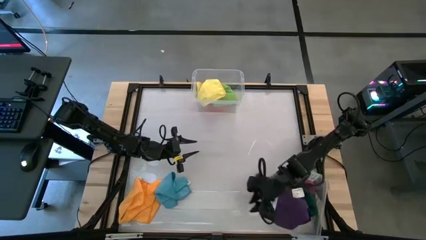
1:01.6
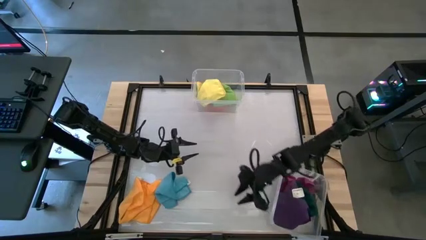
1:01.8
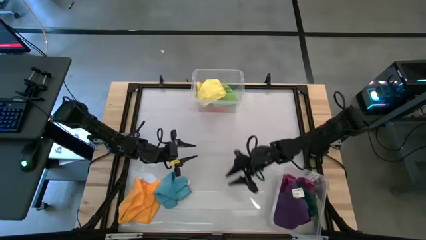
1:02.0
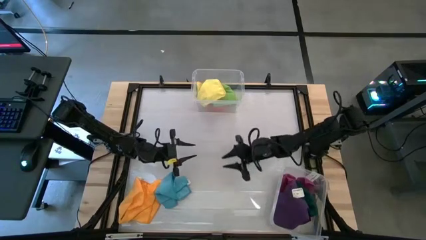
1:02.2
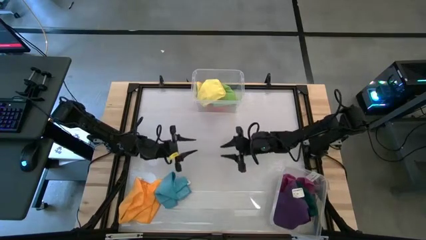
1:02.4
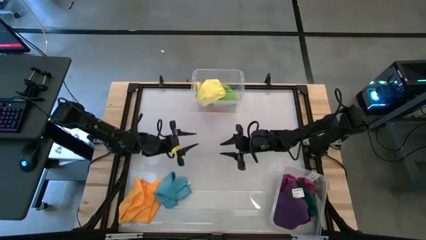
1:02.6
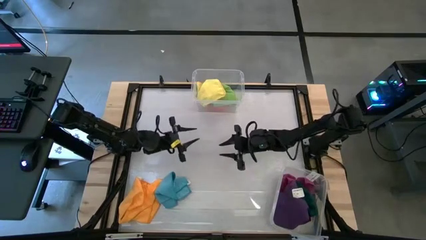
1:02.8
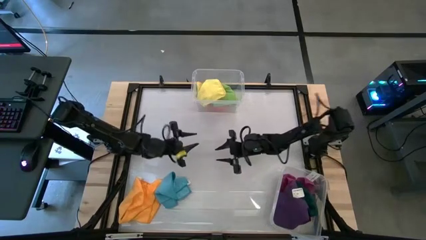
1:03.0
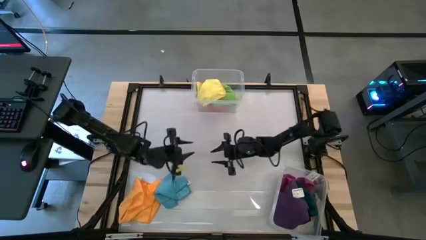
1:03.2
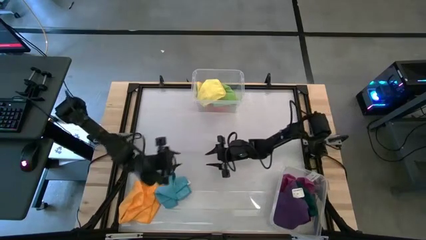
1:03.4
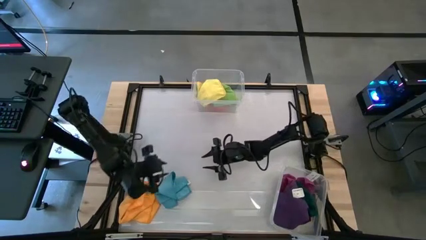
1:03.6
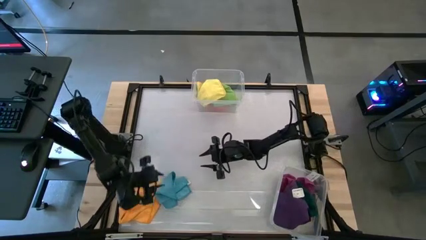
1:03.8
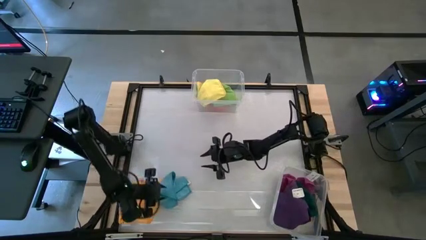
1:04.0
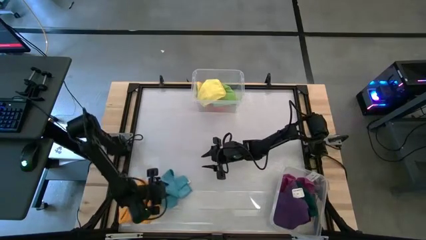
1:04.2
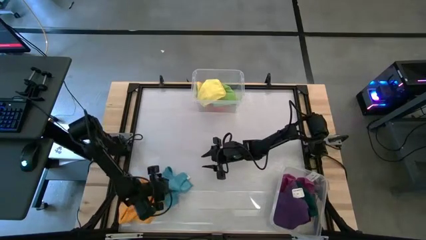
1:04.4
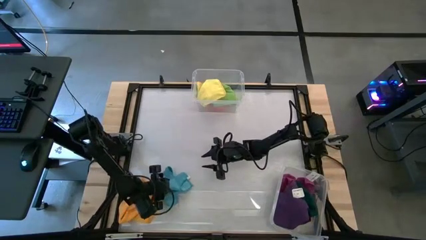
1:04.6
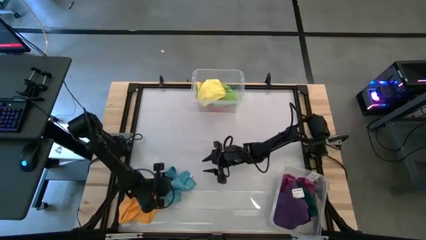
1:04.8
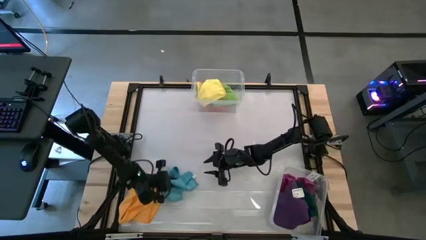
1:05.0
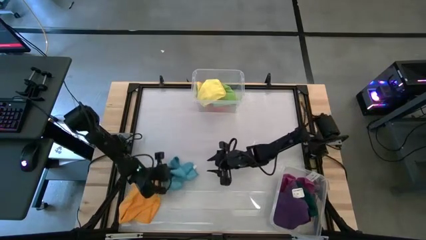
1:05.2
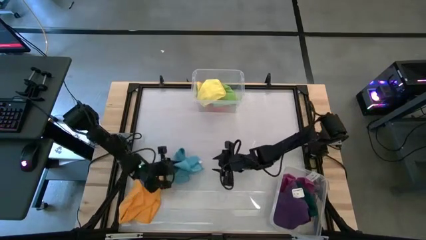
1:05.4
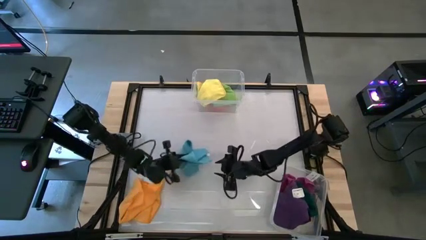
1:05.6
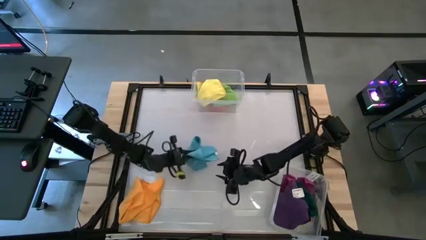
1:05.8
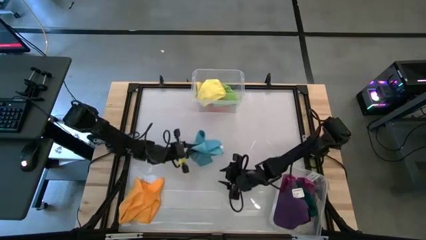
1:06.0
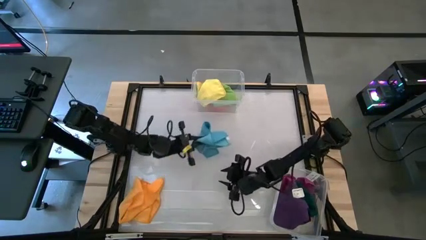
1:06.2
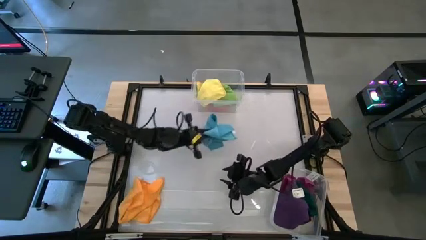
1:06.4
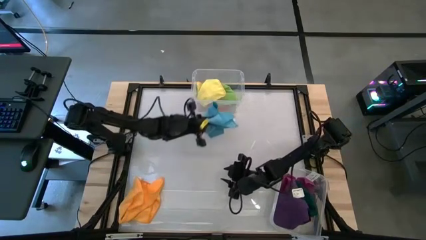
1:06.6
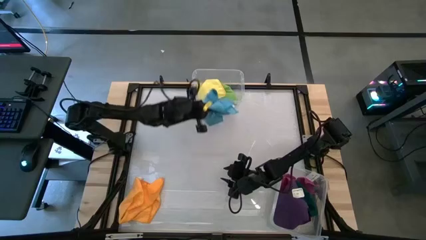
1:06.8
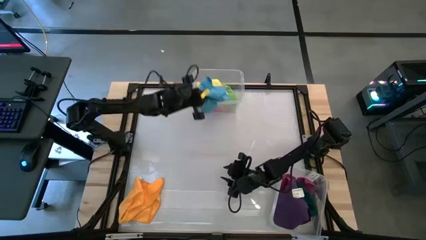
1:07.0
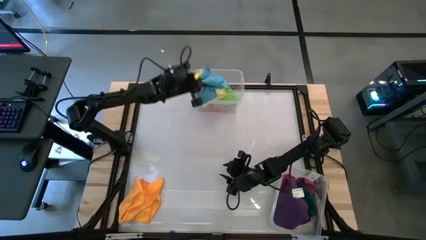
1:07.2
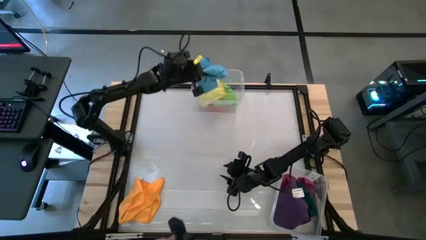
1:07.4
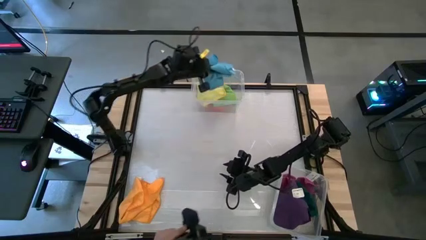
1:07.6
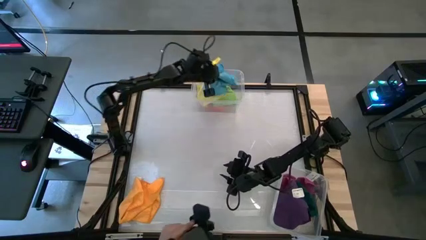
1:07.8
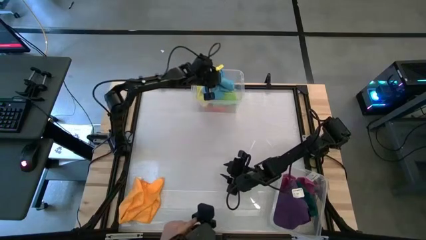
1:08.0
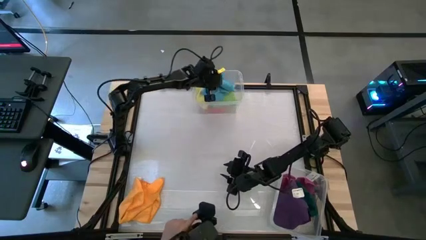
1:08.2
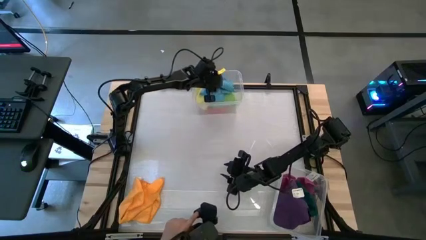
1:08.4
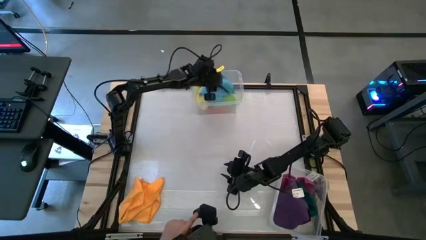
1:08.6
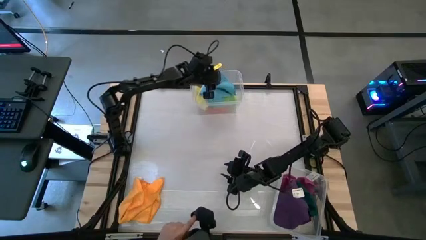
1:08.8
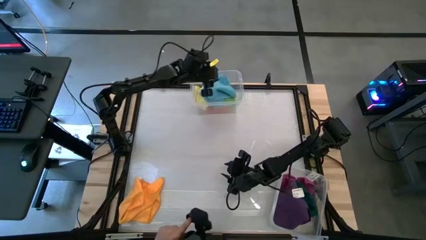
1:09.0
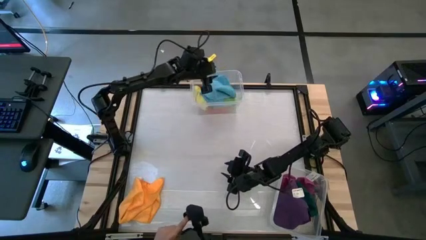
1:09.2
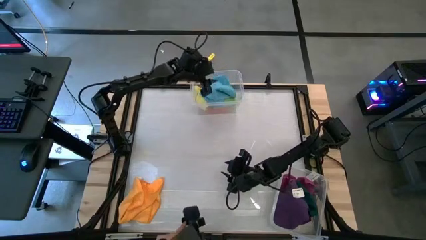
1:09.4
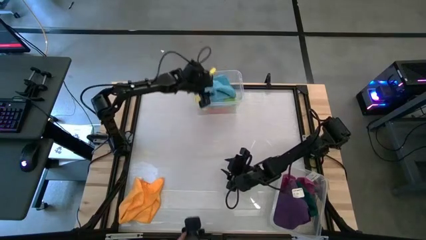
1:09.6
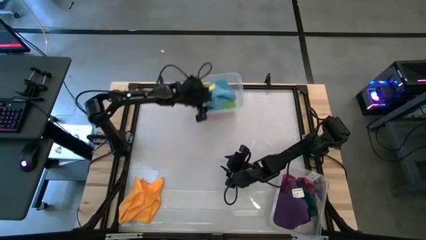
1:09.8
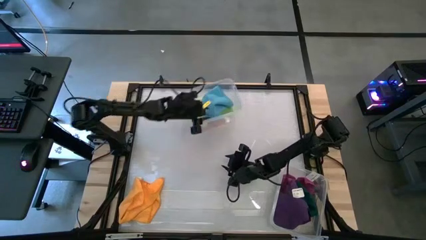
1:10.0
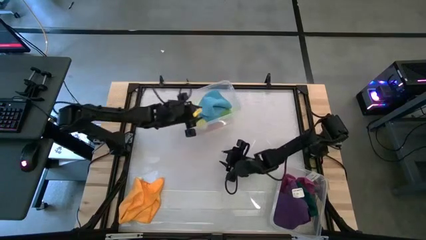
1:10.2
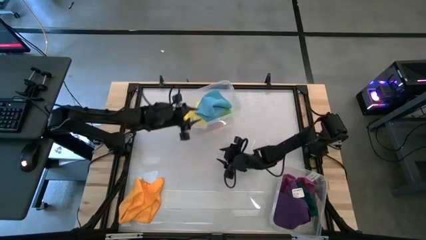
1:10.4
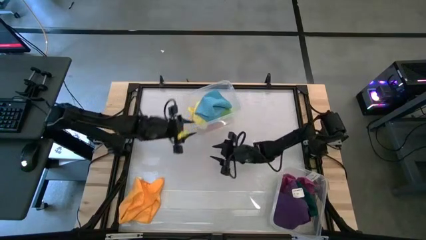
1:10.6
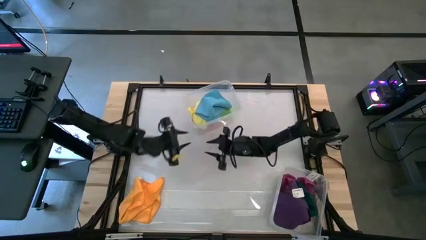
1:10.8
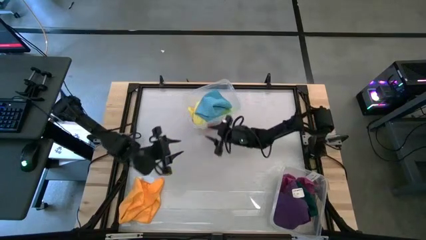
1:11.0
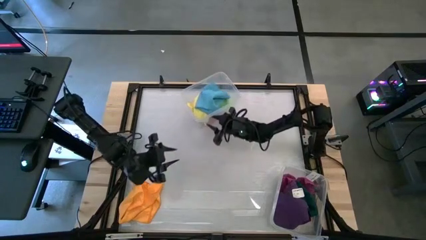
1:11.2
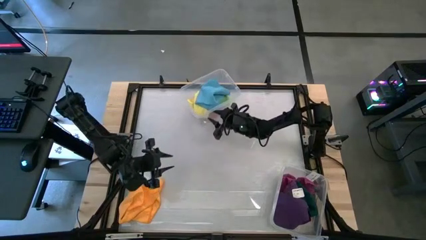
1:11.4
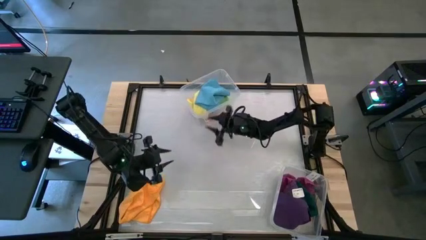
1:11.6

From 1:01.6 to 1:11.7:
Task: Sort towels by color in basket
Put the blue microfiber cloth into the top transparent bin

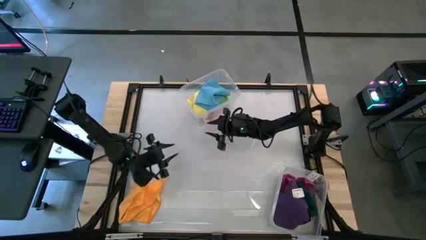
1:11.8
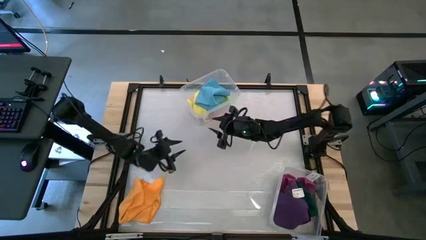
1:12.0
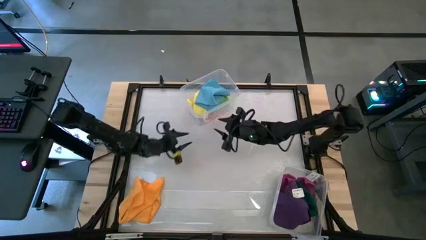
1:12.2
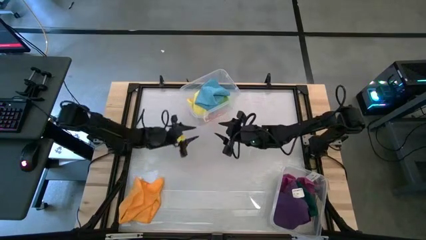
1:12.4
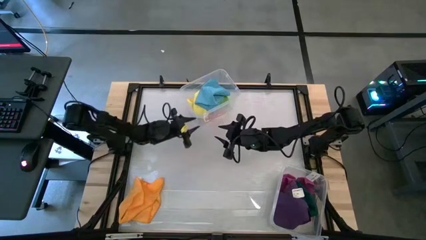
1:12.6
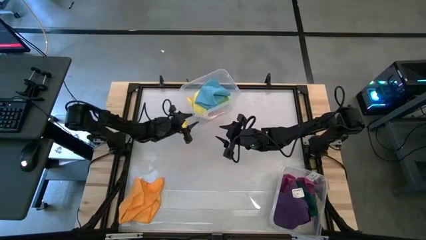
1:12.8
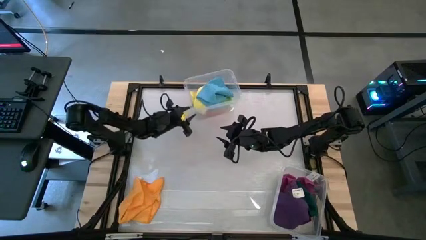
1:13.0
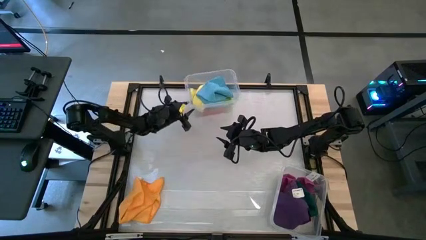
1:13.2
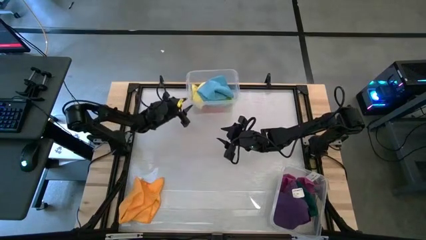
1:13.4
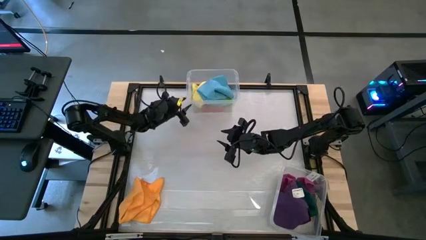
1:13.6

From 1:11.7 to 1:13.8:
Adjust the top transparent bin

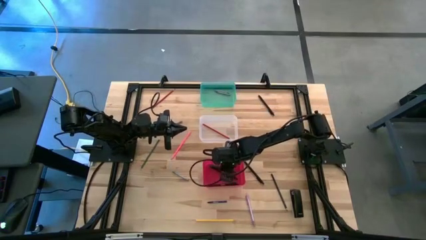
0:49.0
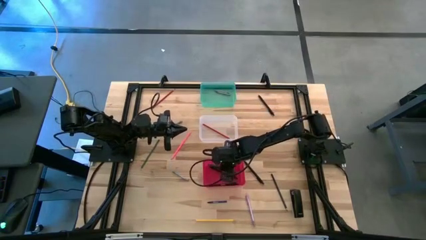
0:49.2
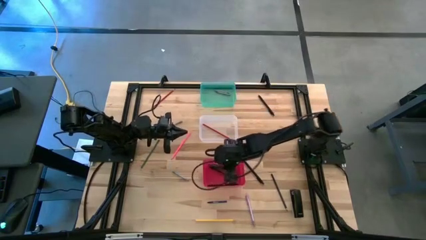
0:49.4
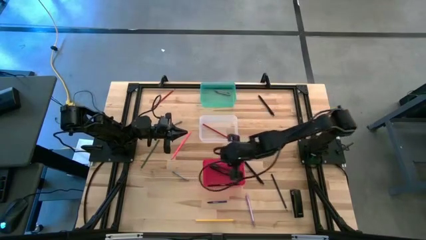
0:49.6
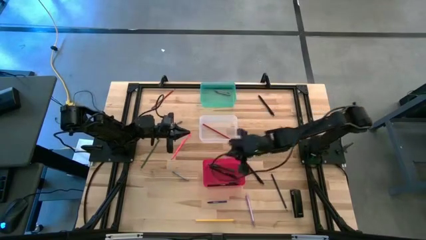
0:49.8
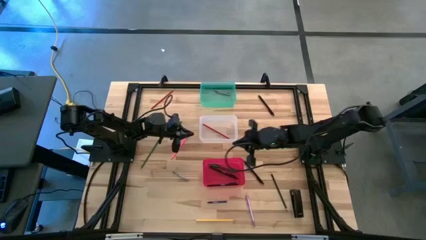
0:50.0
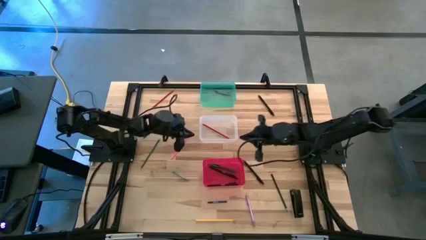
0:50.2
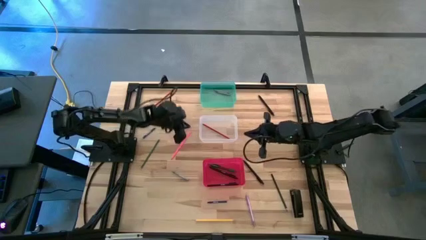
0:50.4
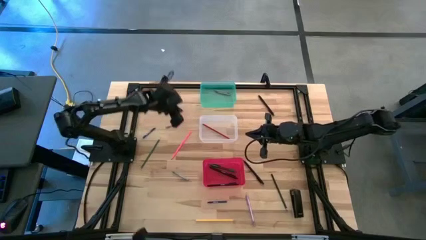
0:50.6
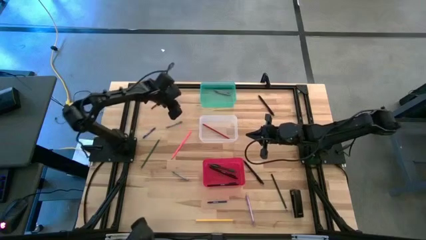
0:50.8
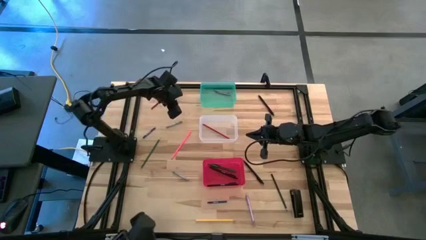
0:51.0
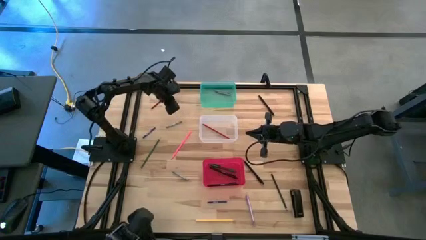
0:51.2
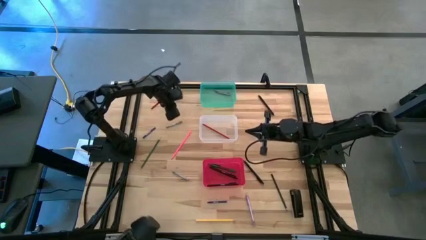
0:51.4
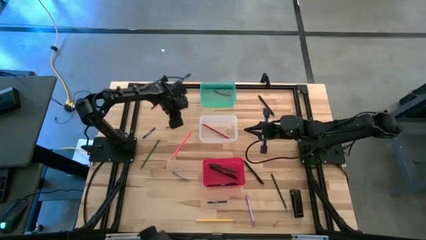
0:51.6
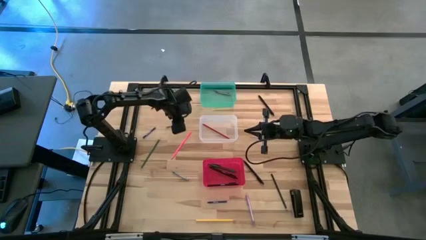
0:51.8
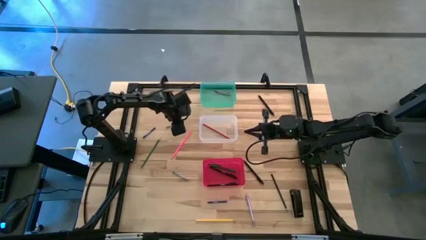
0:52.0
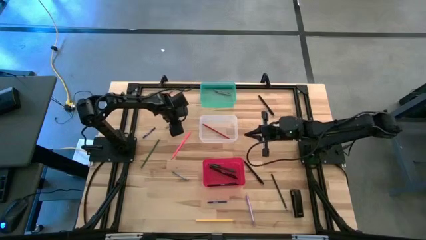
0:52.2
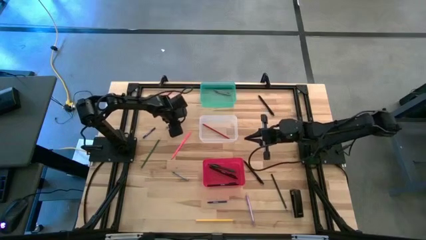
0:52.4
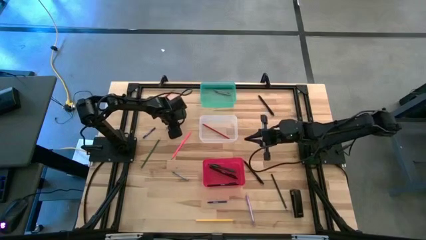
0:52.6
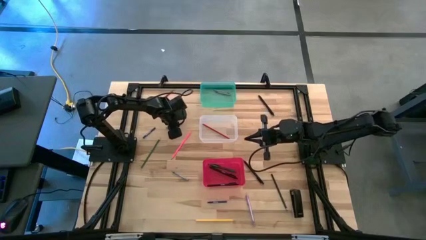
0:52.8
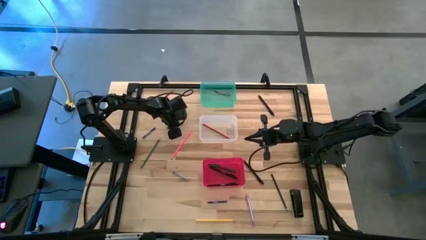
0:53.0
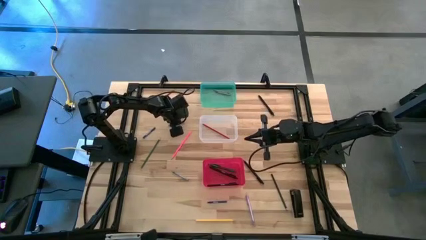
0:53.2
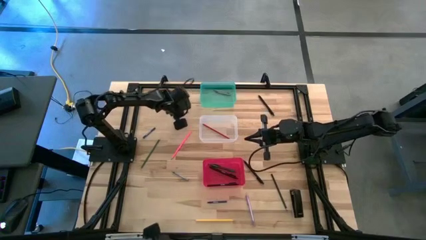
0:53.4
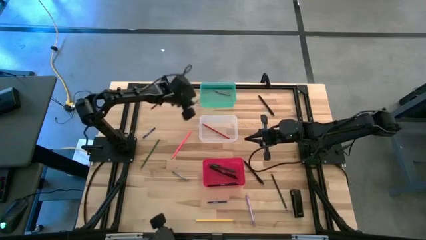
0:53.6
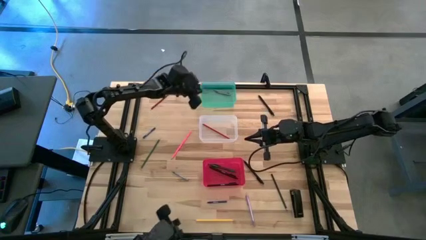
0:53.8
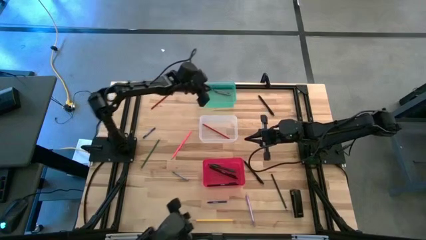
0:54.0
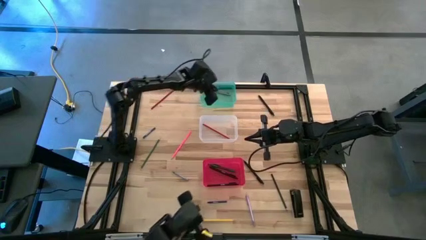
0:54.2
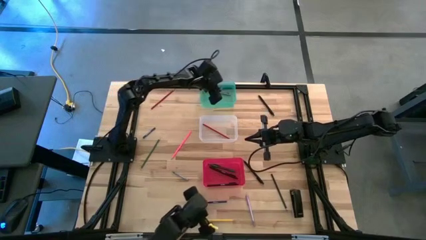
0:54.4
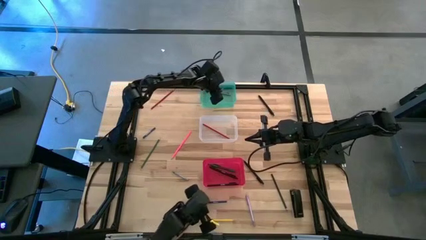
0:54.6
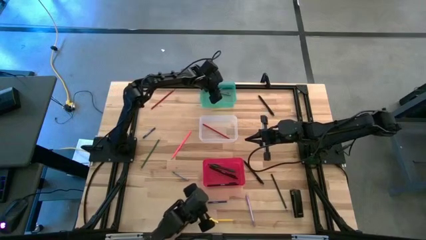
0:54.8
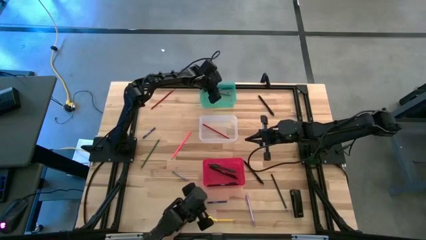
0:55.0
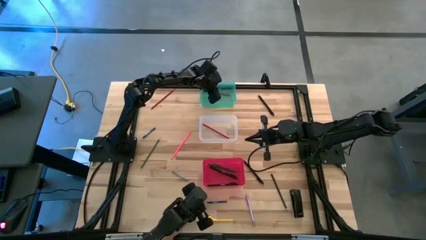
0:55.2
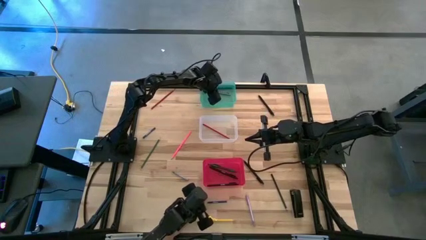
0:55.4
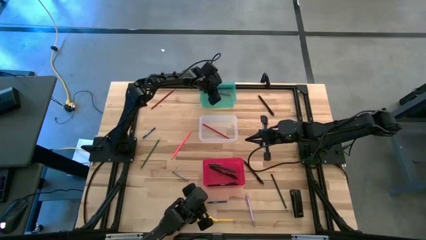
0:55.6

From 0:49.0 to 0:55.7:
Task: Sort crayons/erasers/pens/pencils in bins
Put the top gray crayon into the green bin
